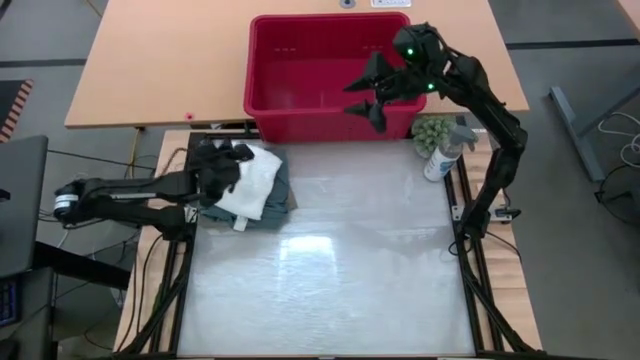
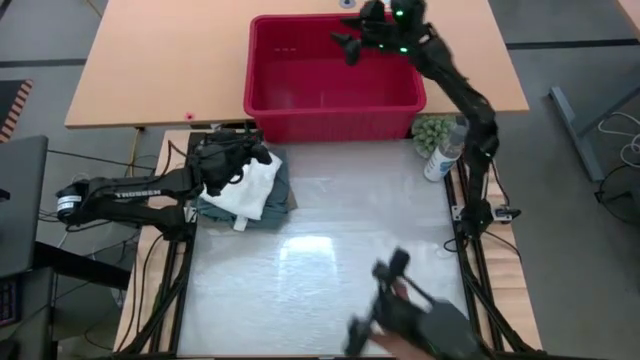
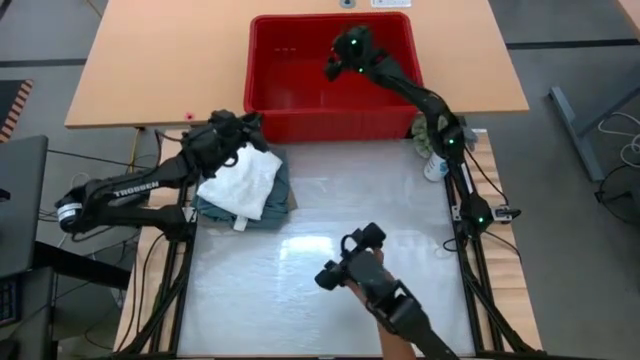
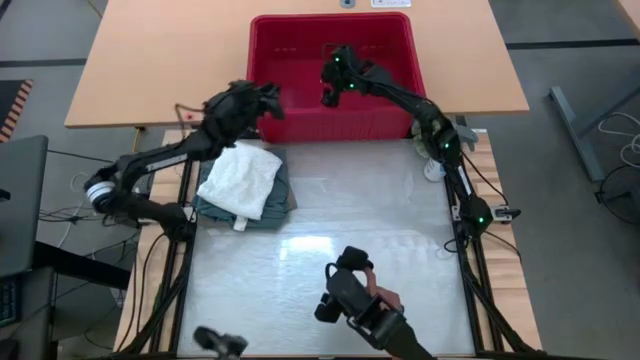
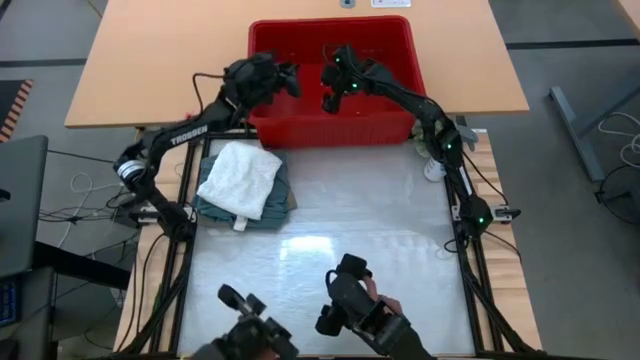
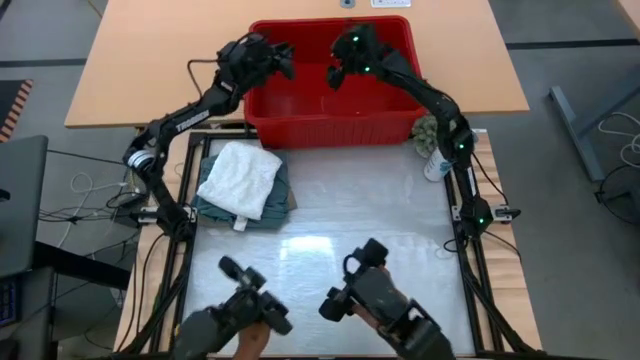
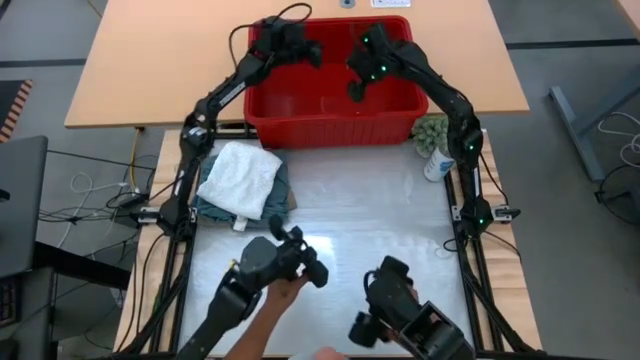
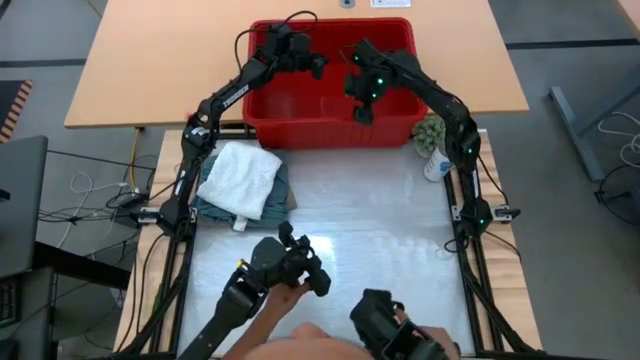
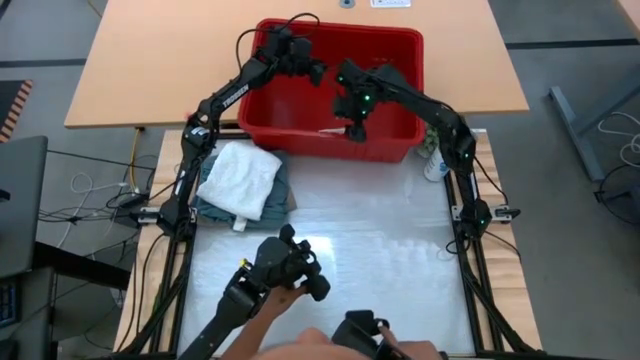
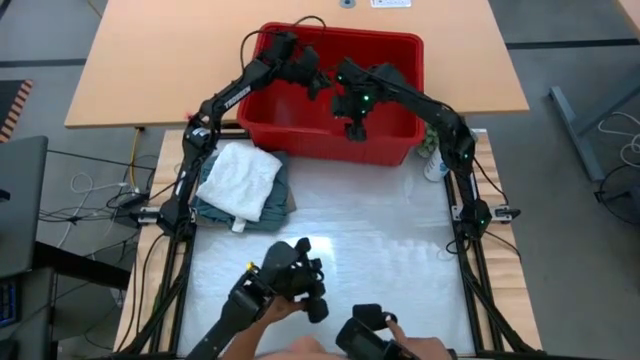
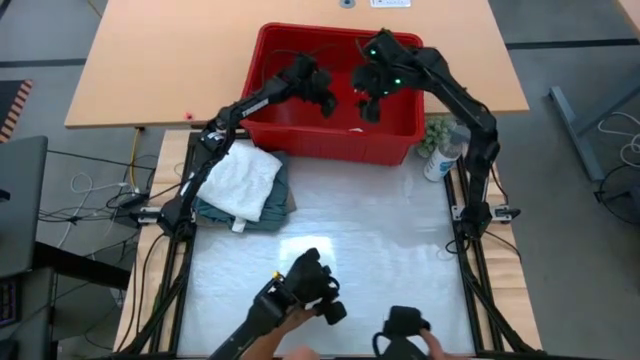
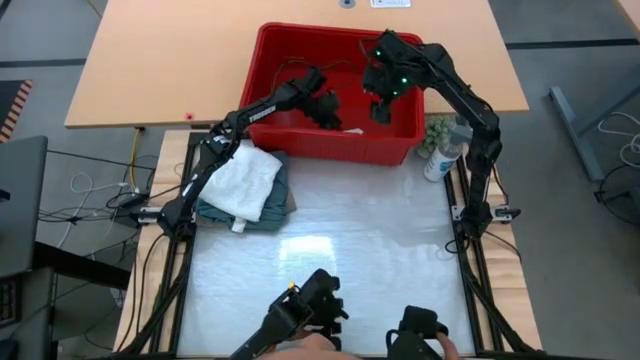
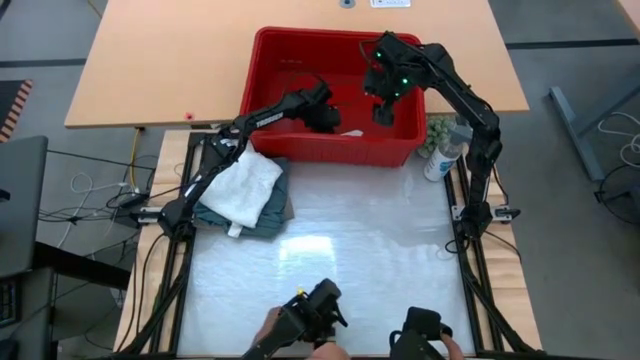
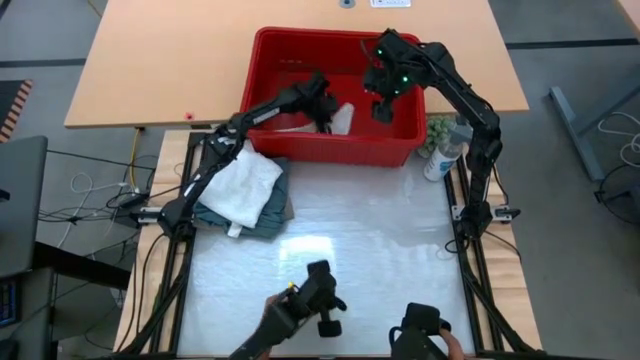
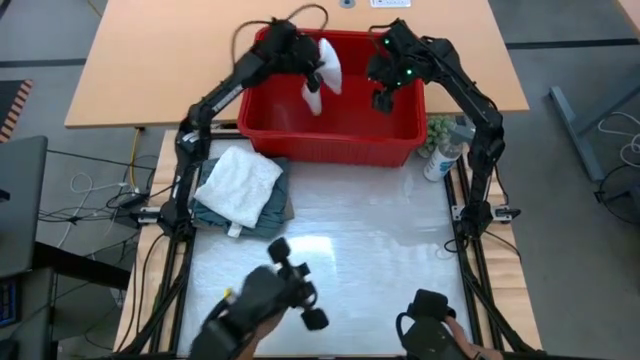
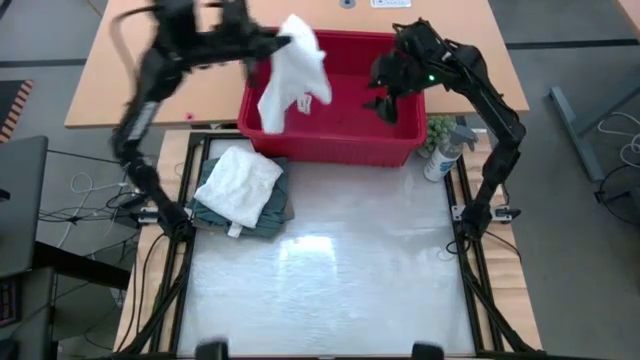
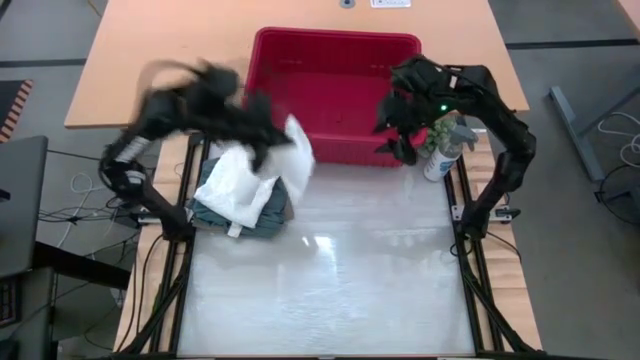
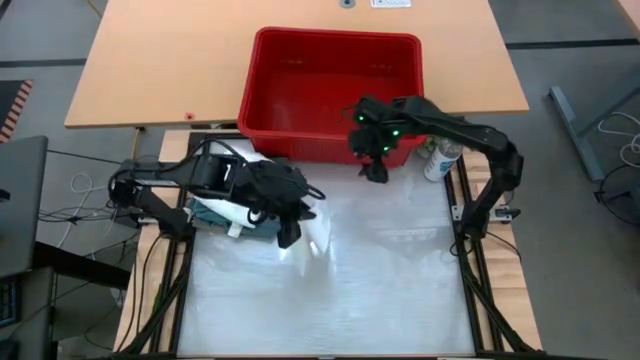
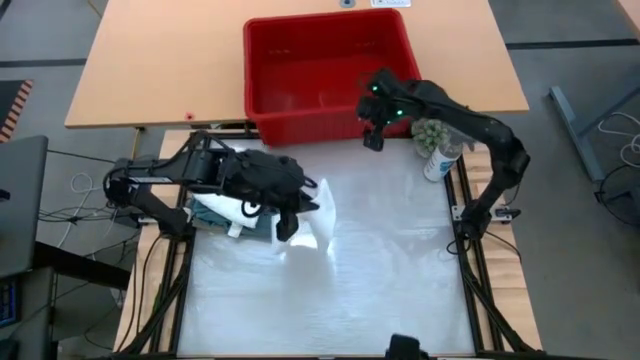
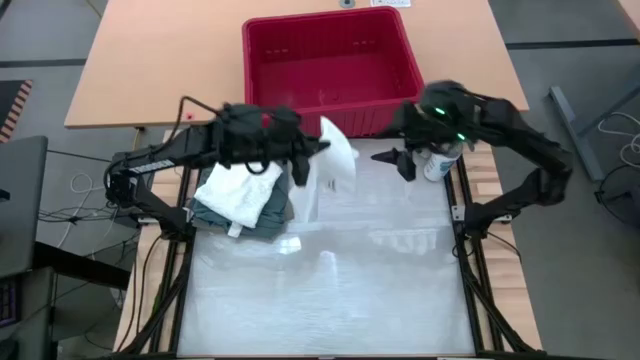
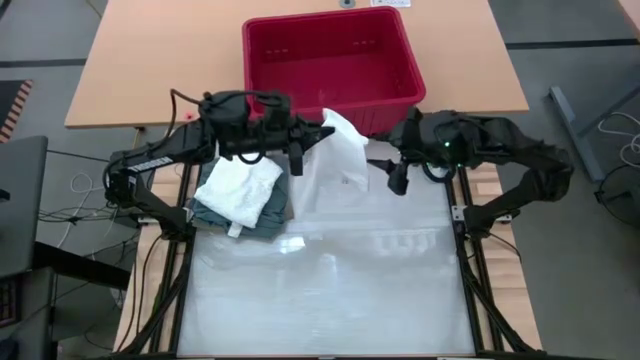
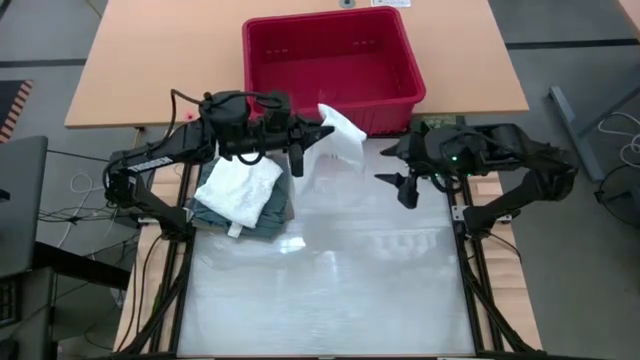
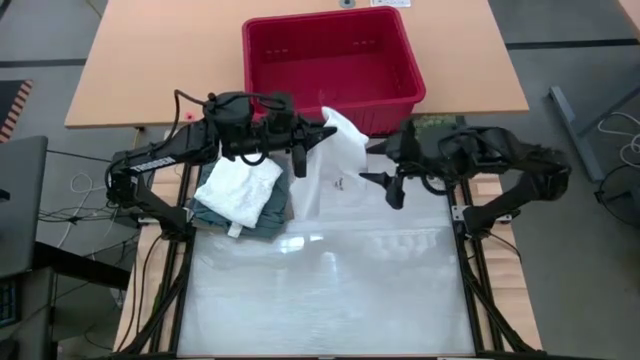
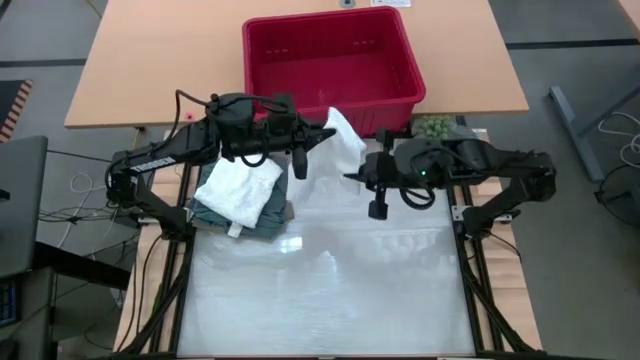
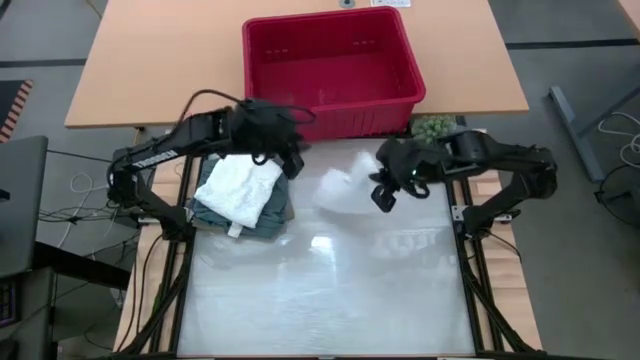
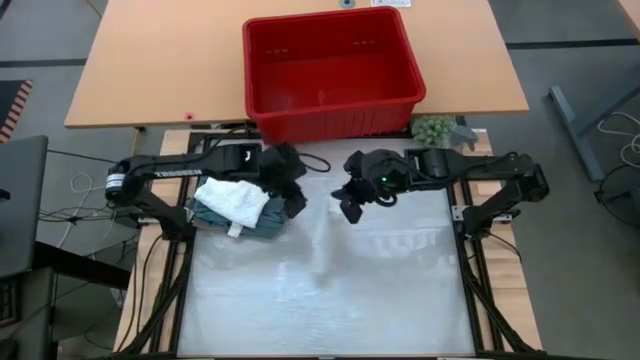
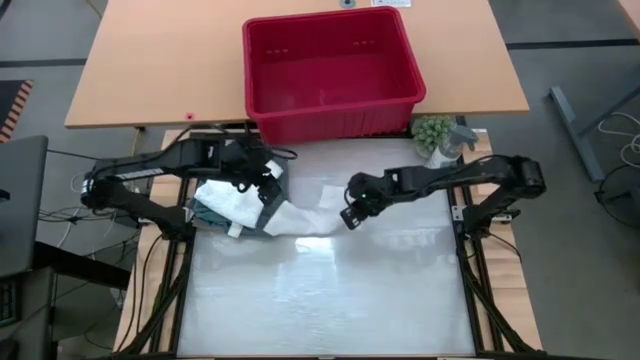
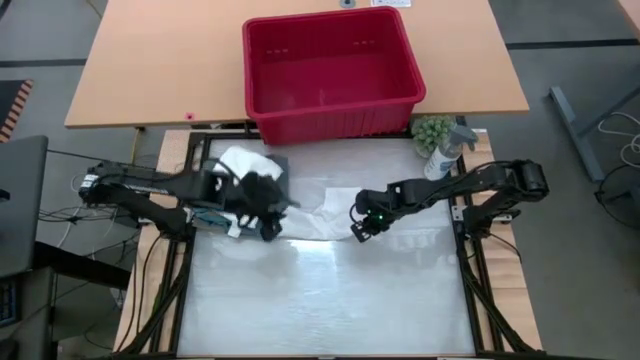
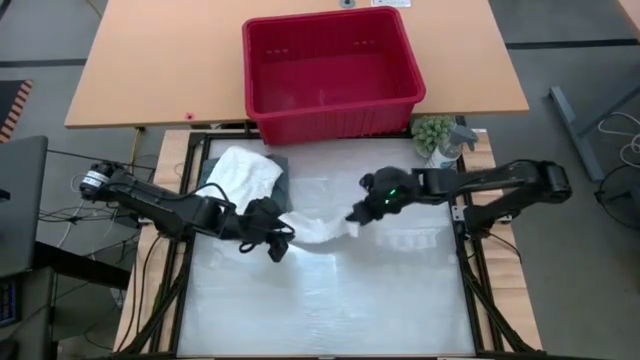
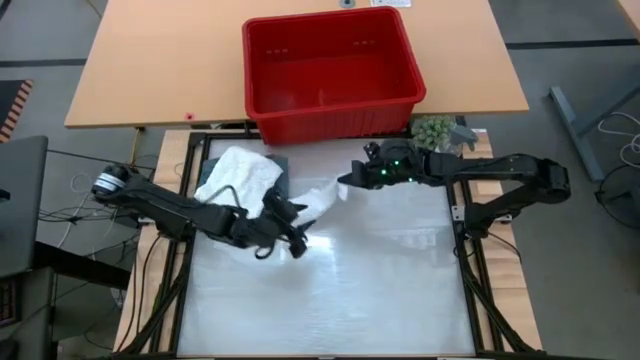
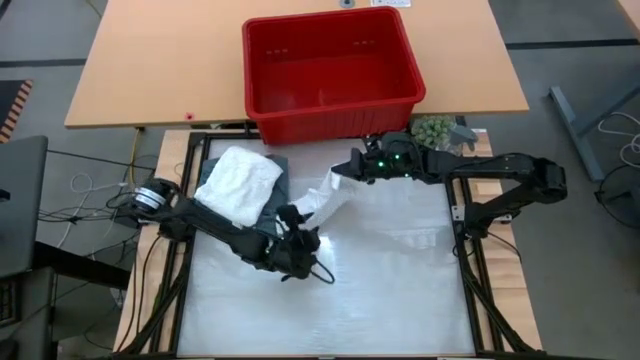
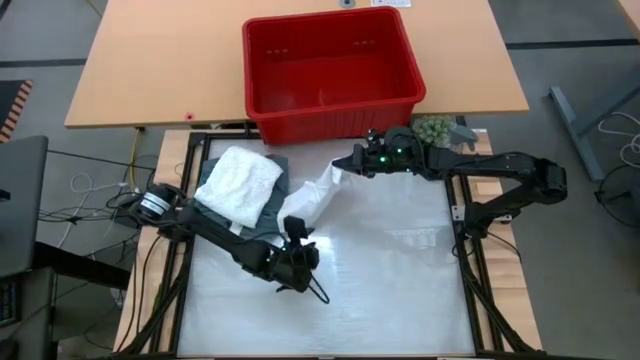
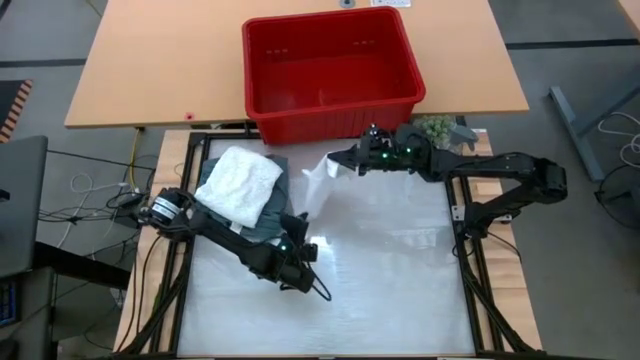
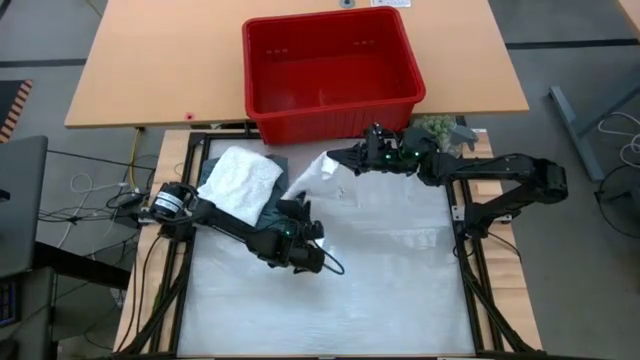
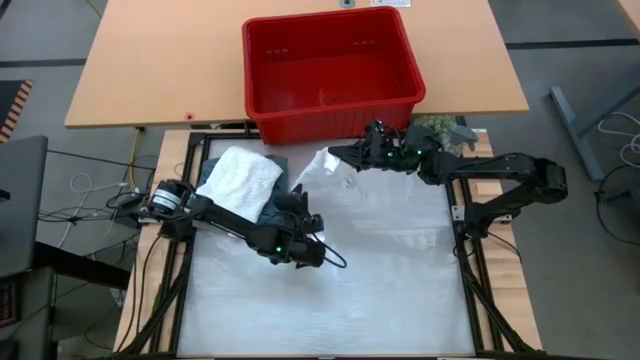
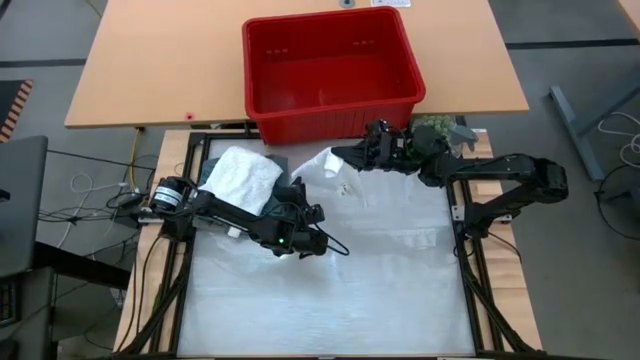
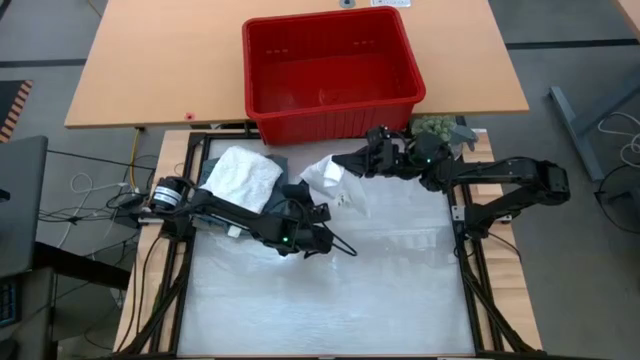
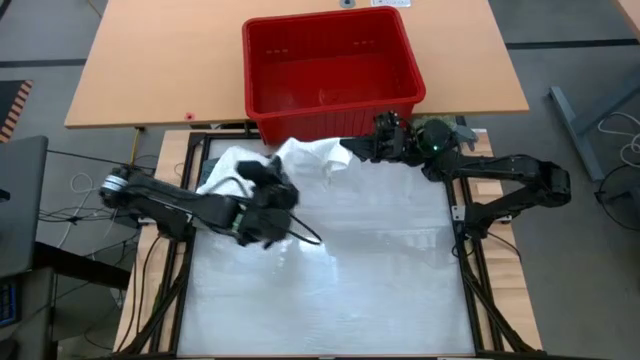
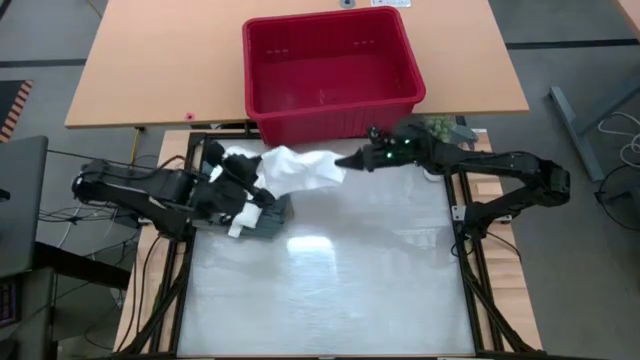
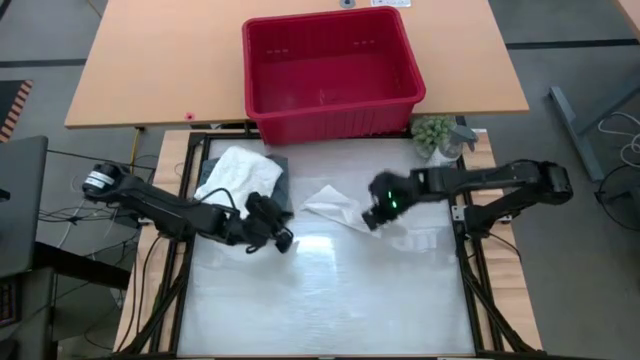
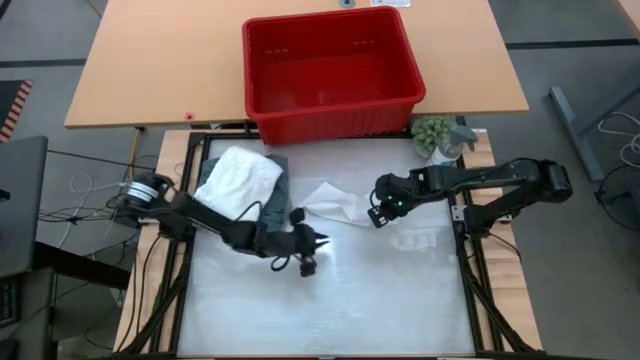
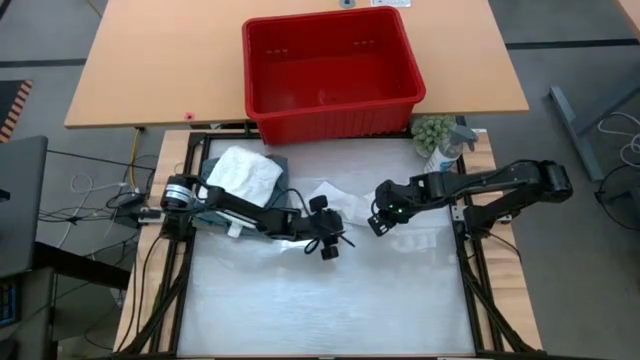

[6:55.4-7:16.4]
Task: Fold Laundry from Bin
Fold the white underwear in the red bin
